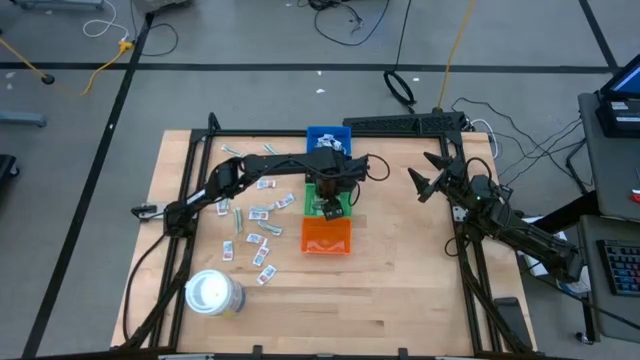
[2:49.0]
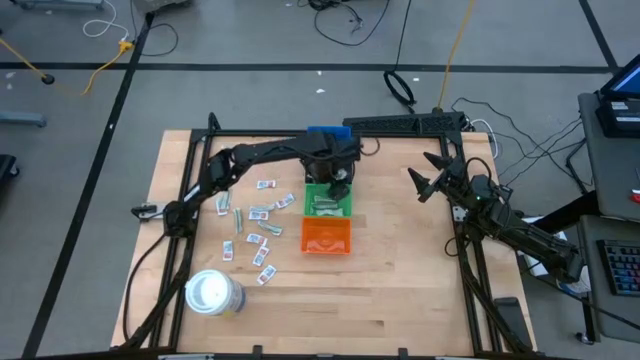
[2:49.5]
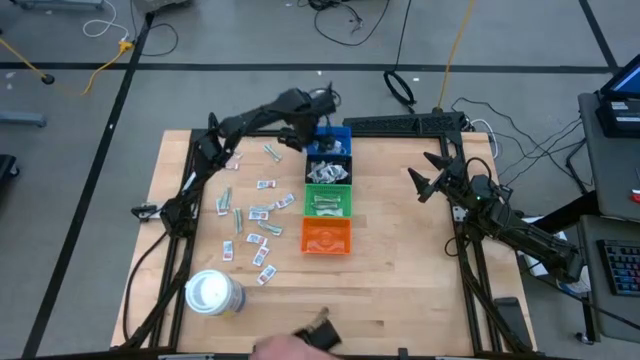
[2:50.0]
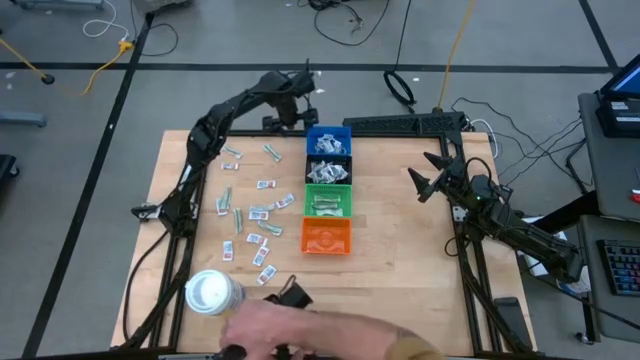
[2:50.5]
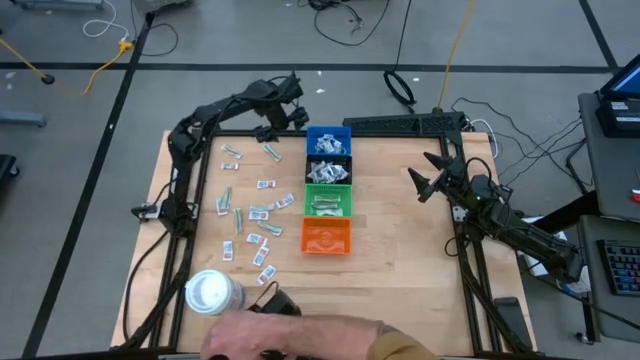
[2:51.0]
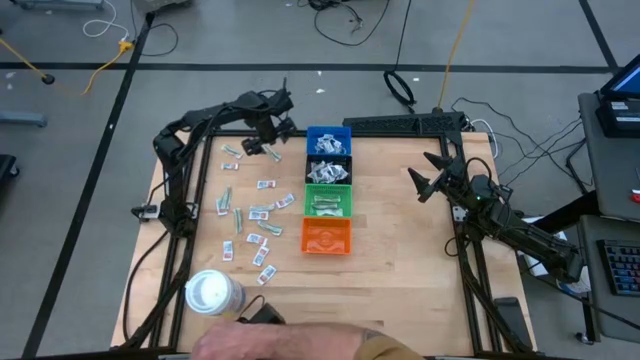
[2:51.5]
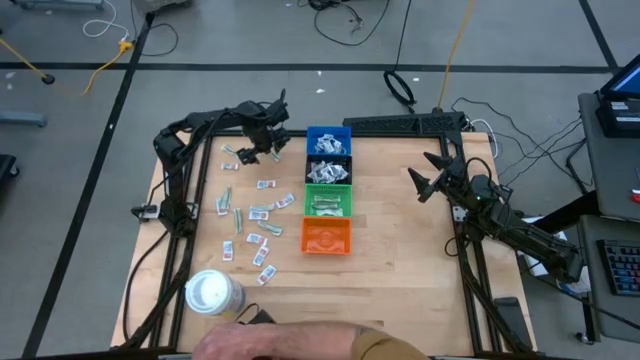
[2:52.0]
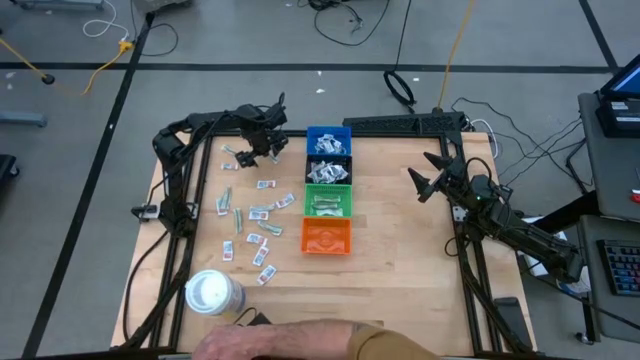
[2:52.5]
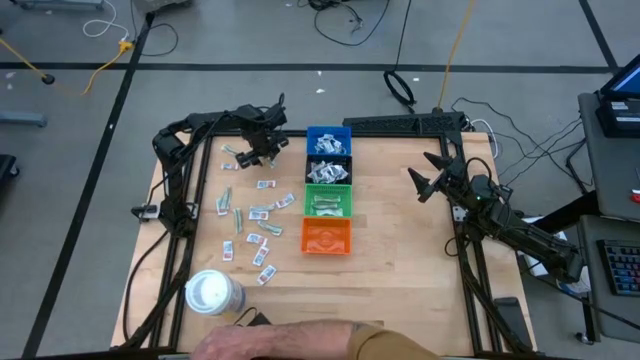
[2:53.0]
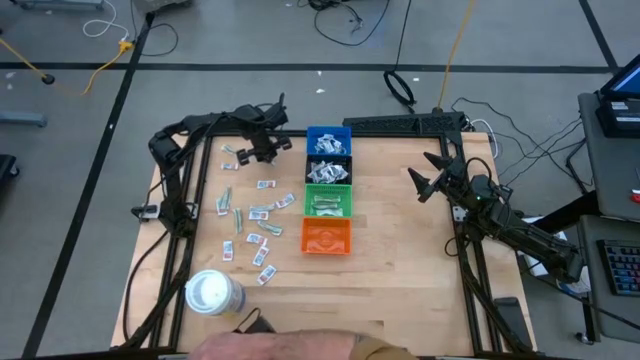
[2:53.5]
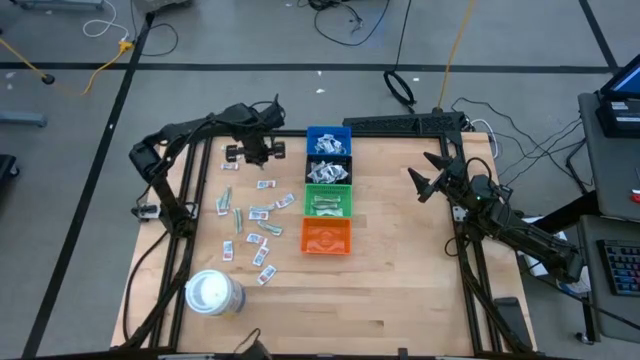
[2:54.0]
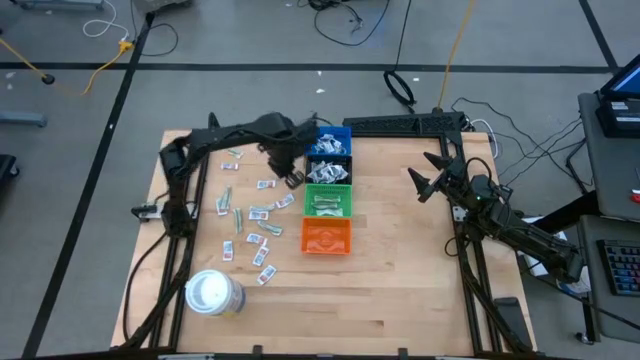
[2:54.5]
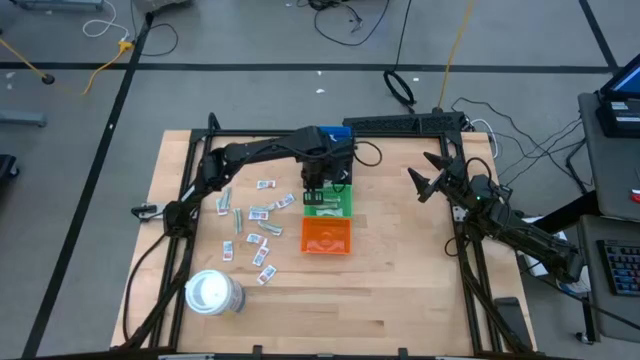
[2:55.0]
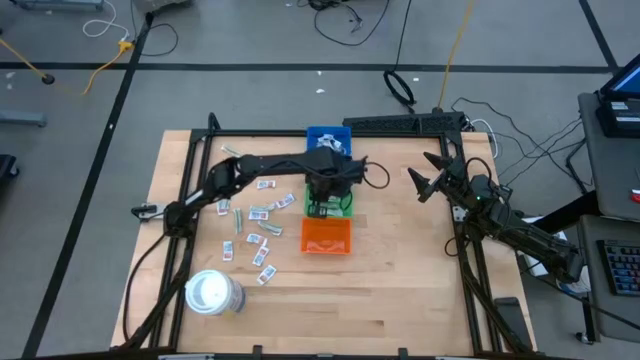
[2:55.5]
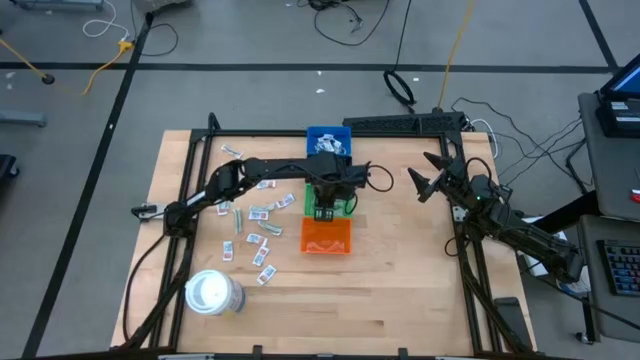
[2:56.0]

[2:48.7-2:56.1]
Task: Pick & Place First Aid Supplies
Put the green bandage into the green bin

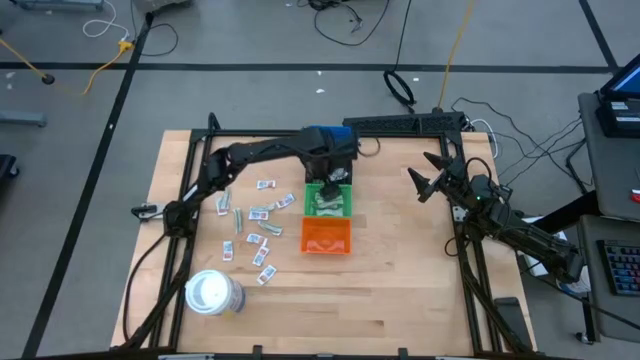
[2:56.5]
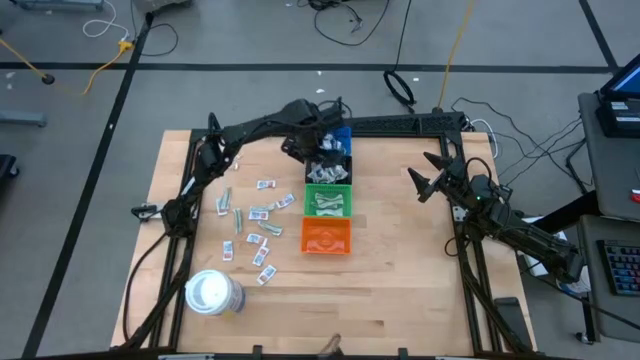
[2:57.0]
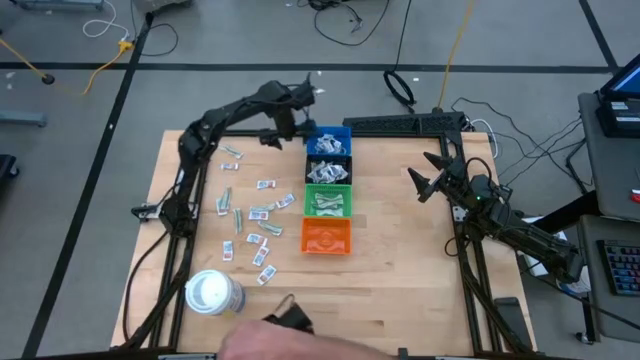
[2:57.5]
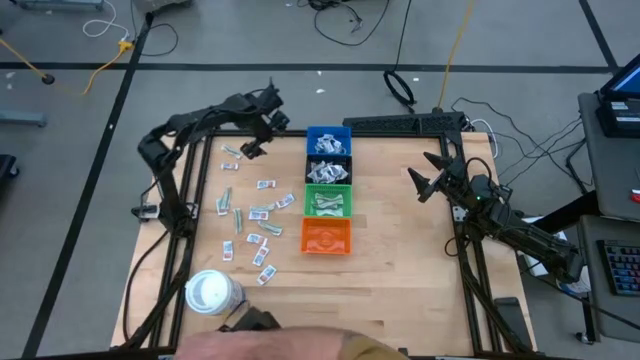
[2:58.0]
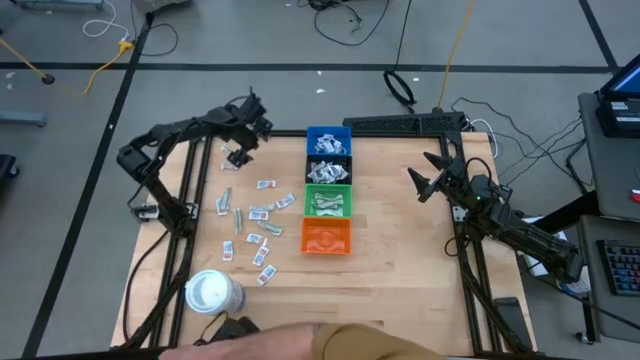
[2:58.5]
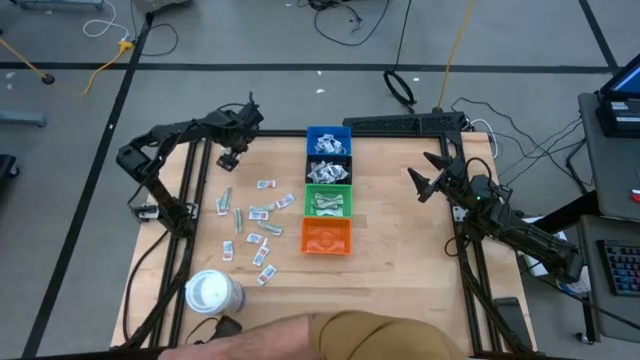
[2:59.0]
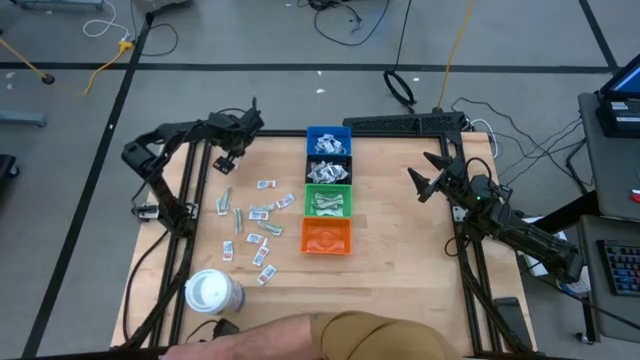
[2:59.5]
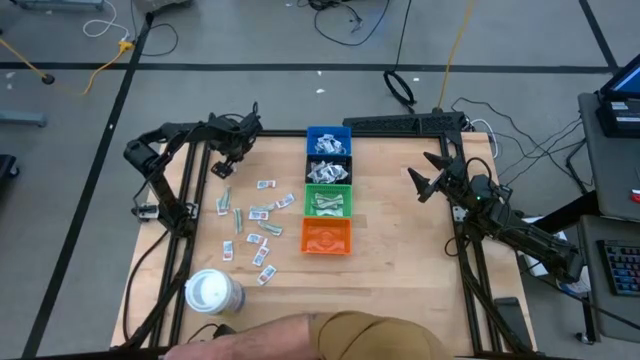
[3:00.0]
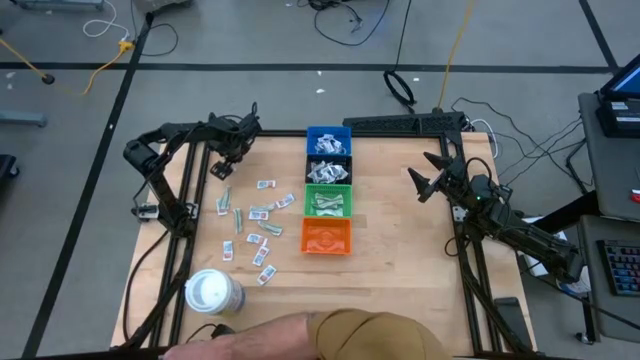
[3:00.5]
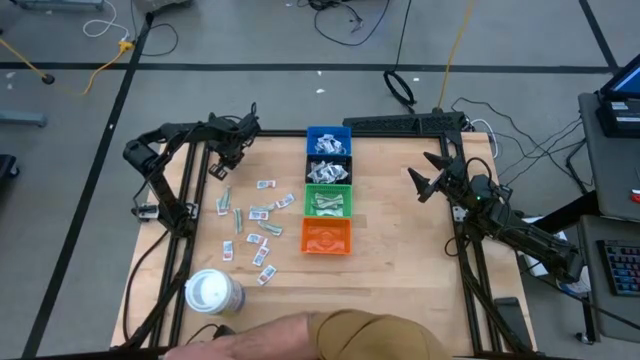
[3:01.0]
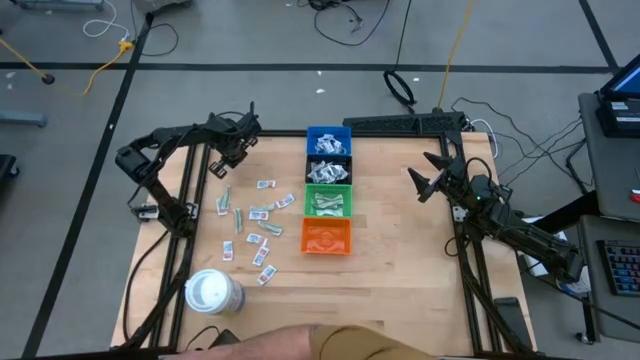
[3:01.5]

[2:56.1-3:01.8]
Put the green bandage into the green bin

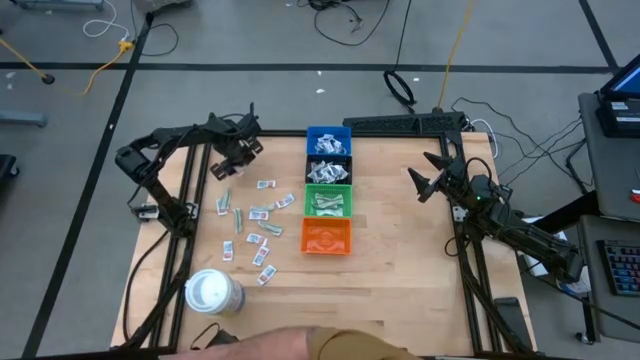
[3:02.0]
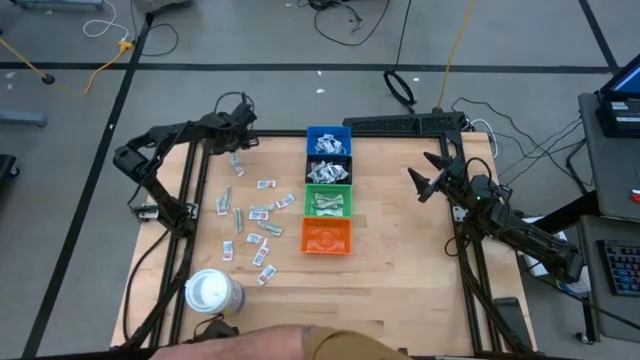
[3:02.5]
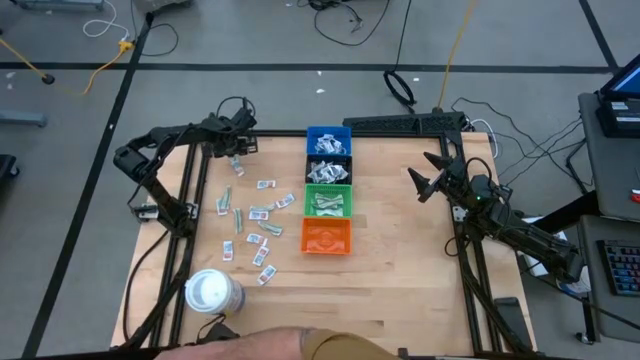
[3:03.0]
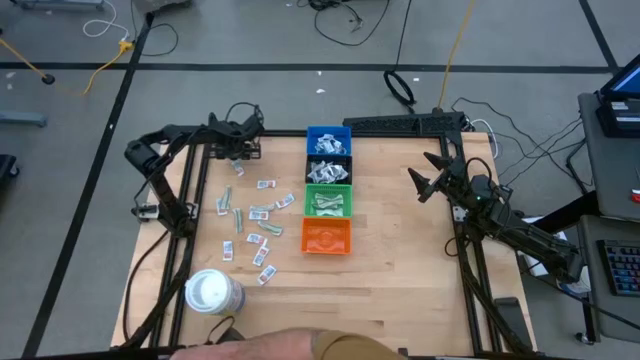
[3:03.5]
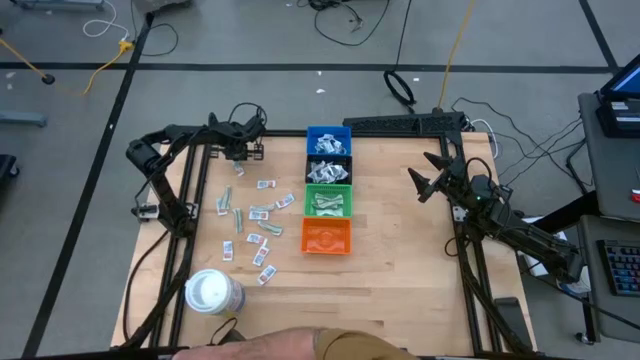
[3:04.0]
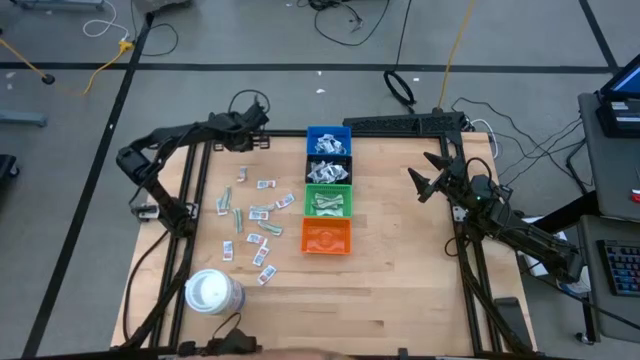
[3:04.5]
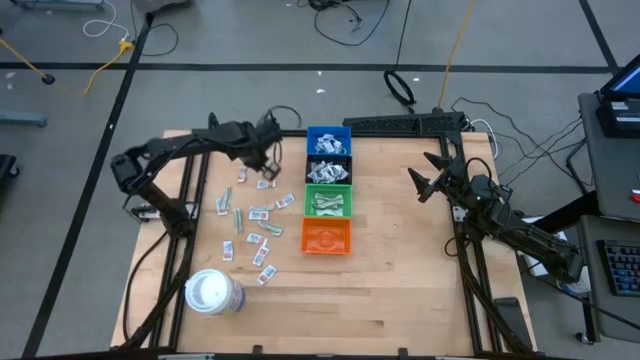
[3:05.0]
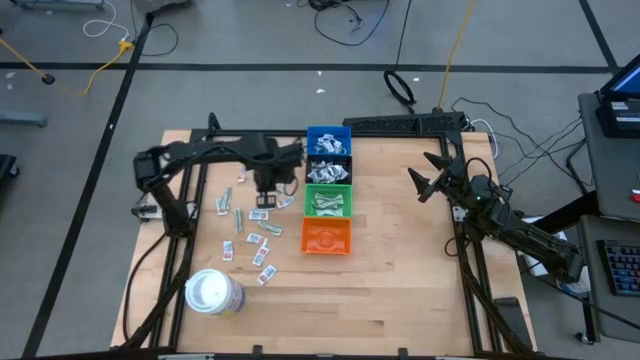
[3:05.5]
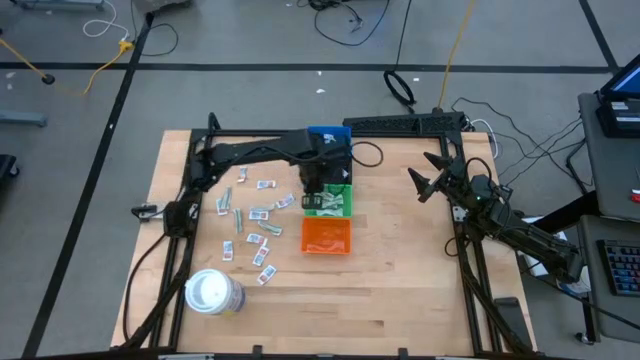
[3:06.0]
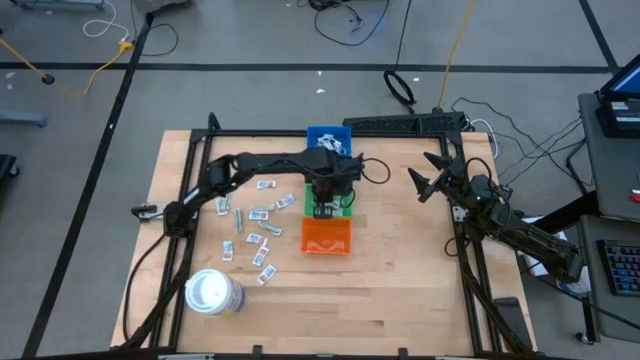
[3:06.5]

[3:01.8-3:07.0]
Put the green bandage into the green bin

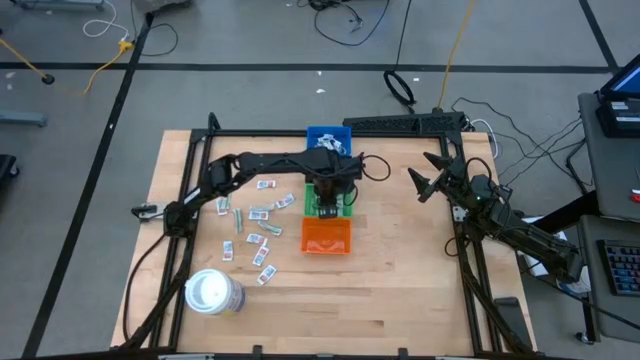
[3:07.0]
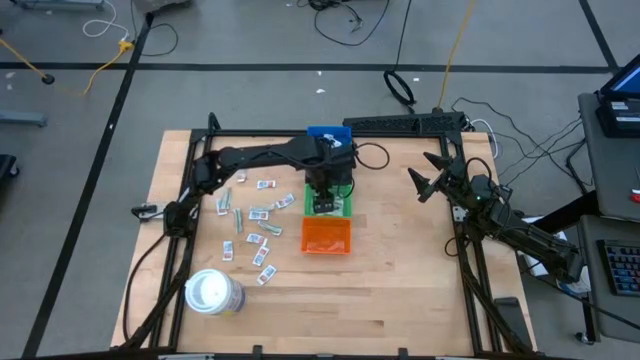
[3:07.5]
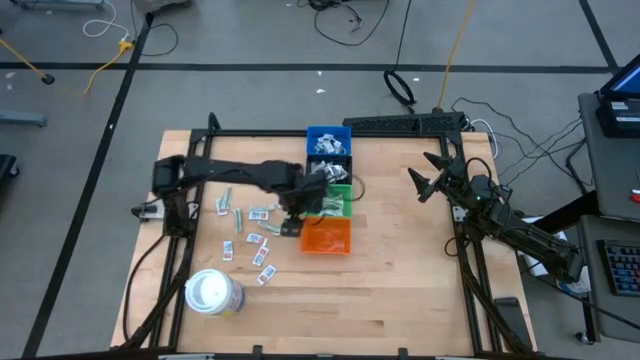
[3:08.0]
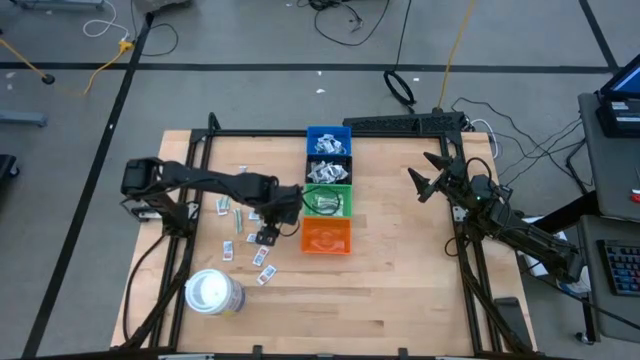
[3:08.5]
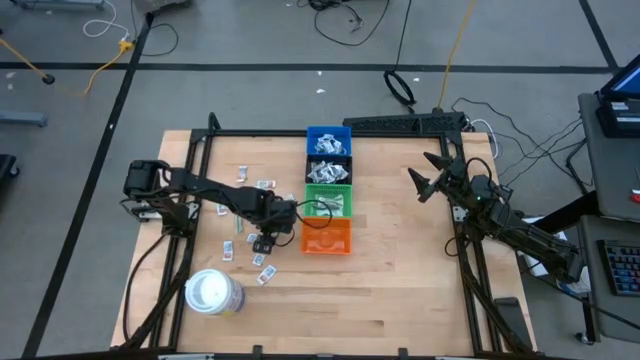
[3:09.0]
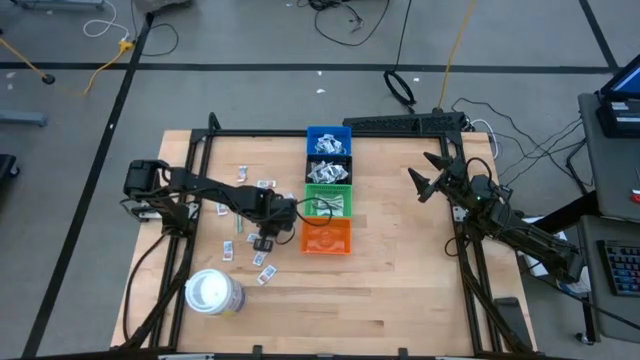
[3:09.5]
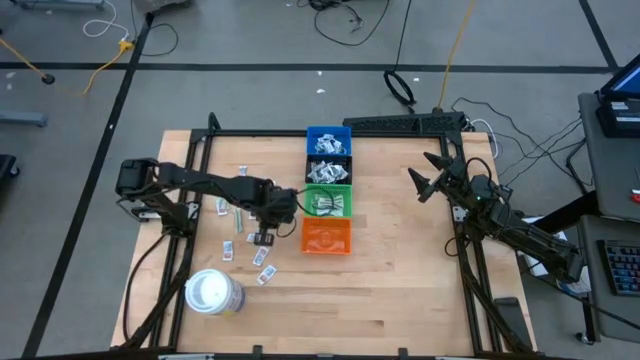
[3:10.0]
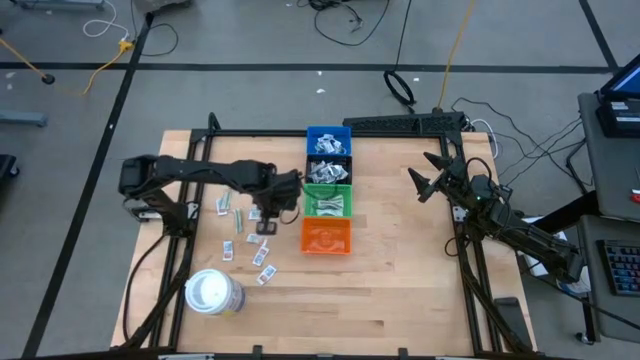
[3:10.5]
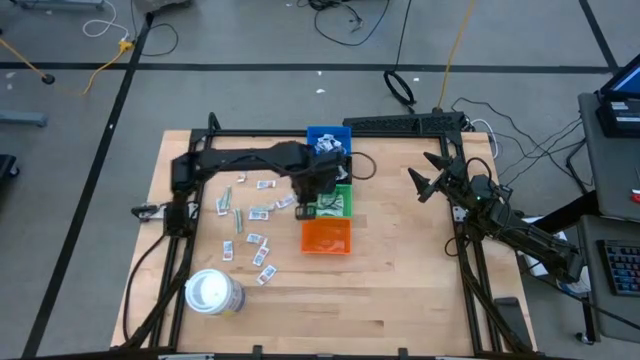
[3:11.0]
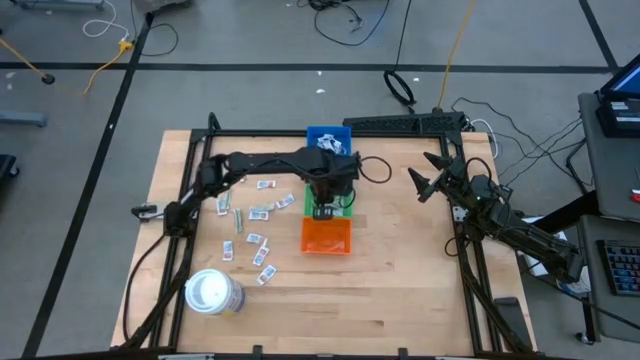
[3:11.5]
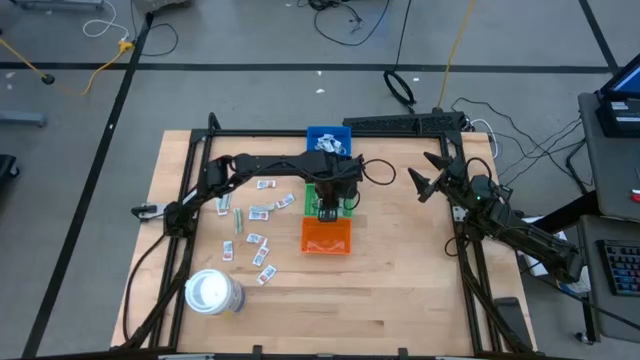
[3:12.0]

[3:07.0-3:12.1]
Put the green bandage into the green bin
